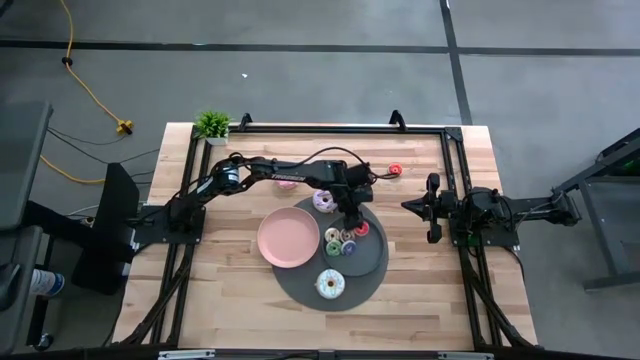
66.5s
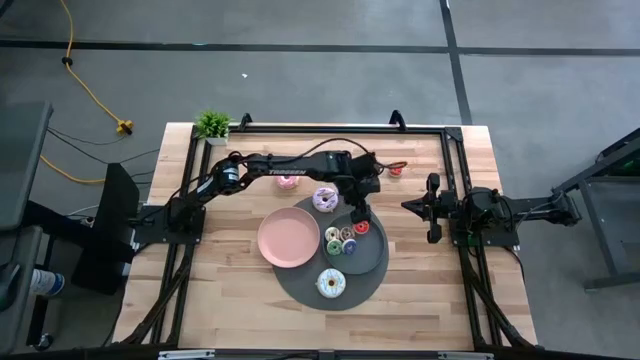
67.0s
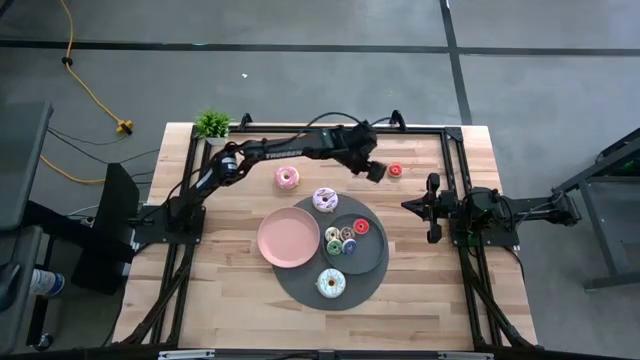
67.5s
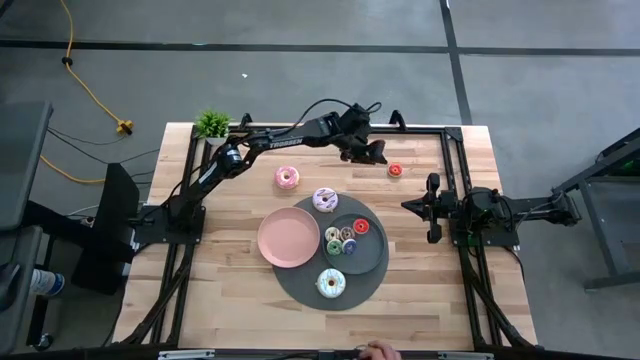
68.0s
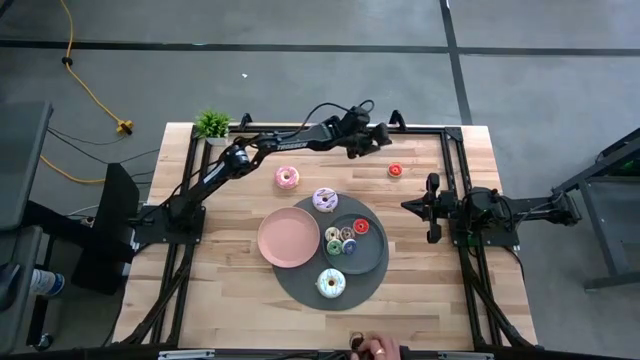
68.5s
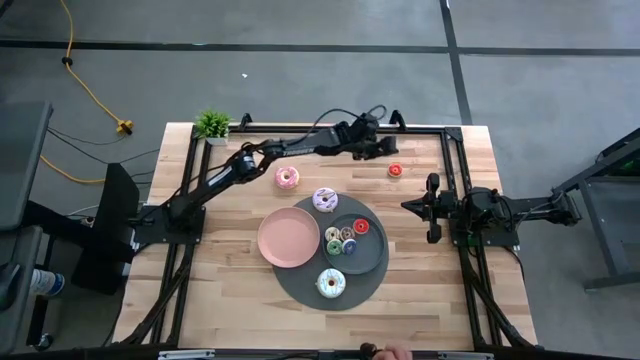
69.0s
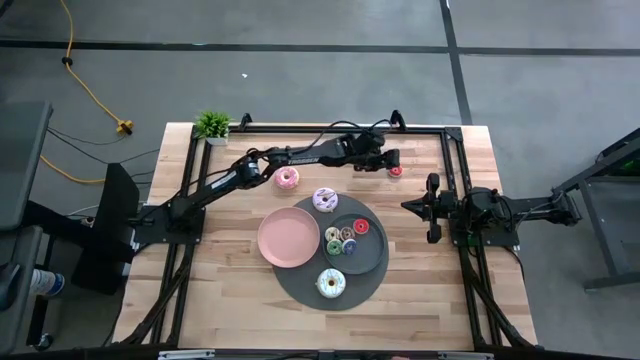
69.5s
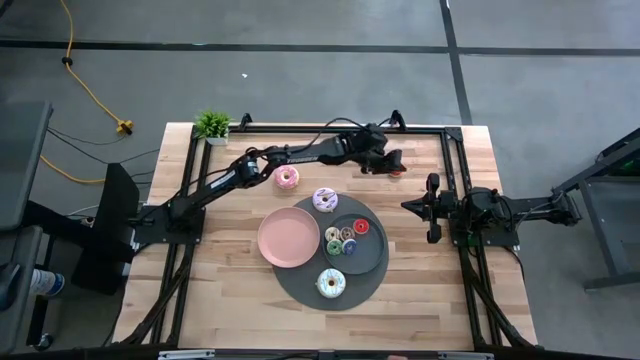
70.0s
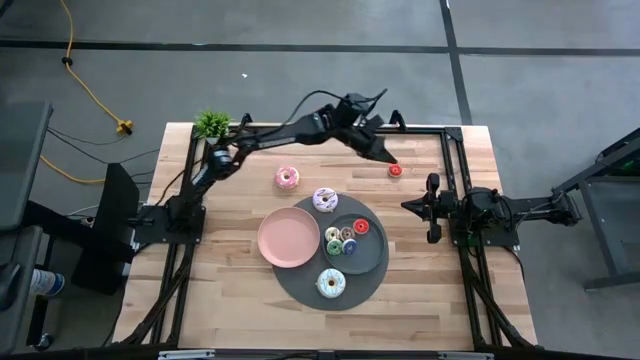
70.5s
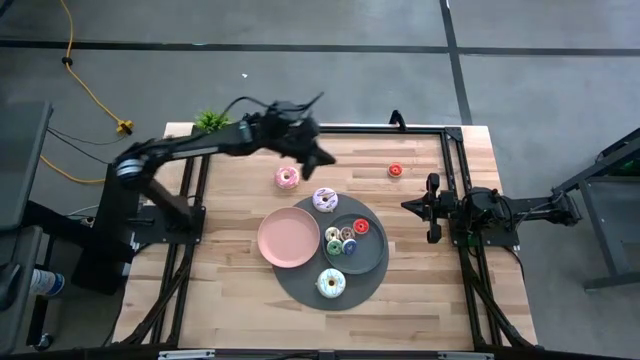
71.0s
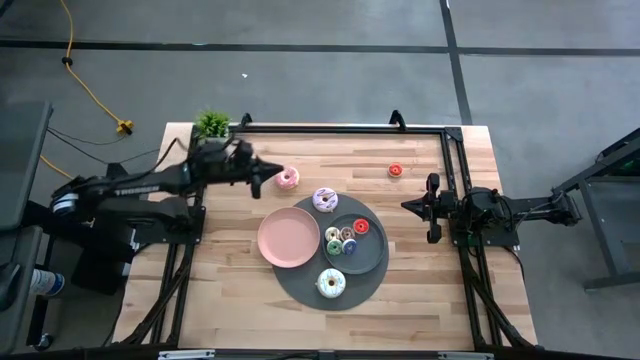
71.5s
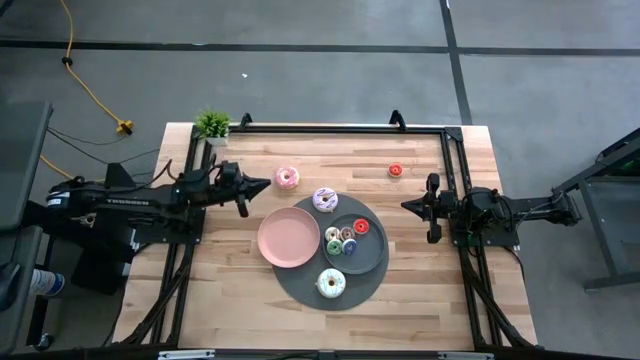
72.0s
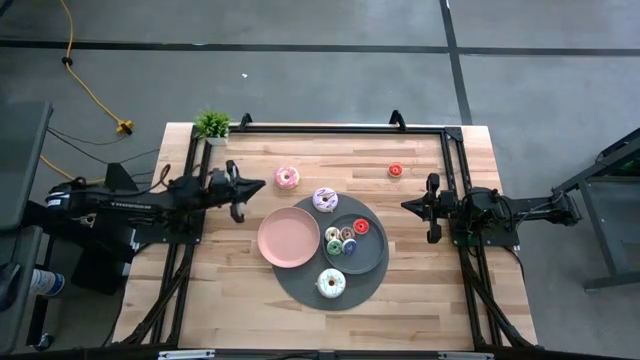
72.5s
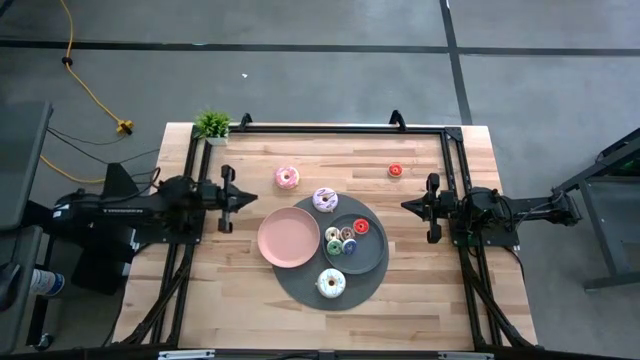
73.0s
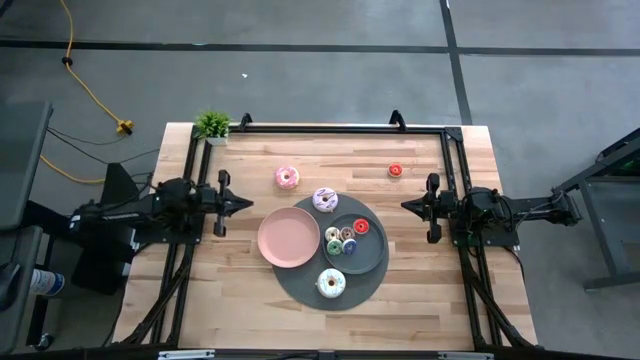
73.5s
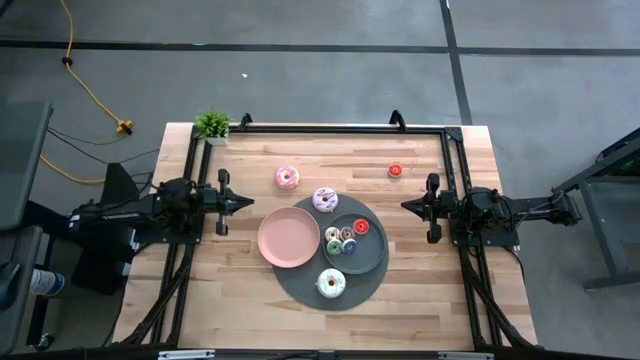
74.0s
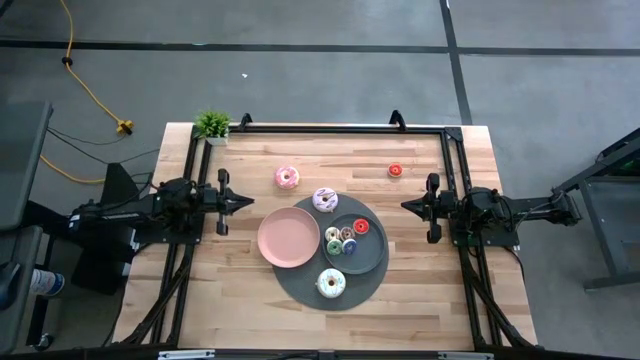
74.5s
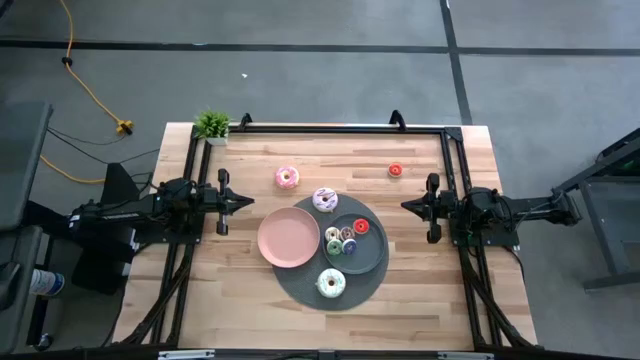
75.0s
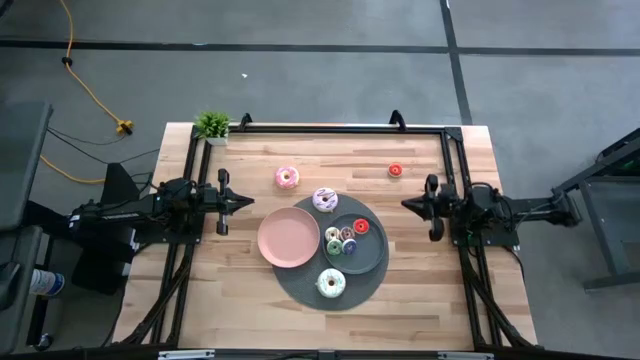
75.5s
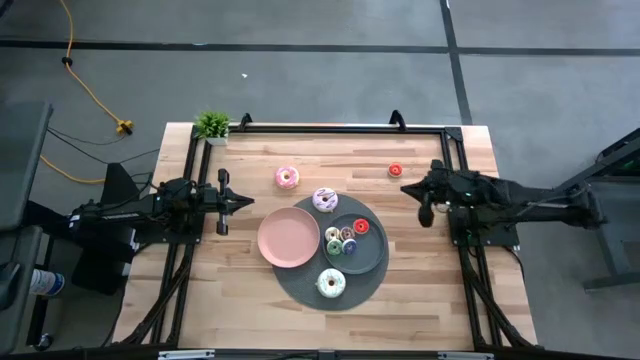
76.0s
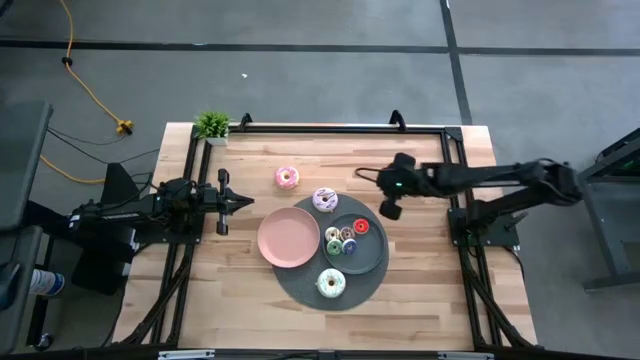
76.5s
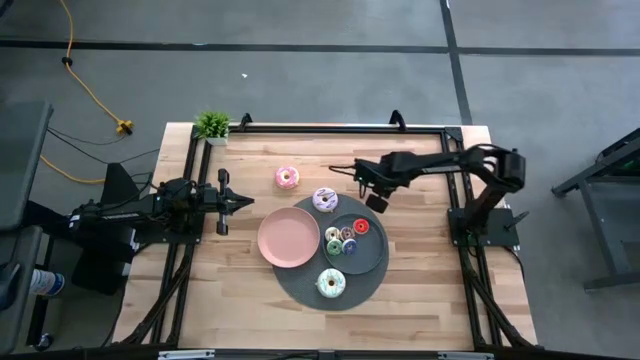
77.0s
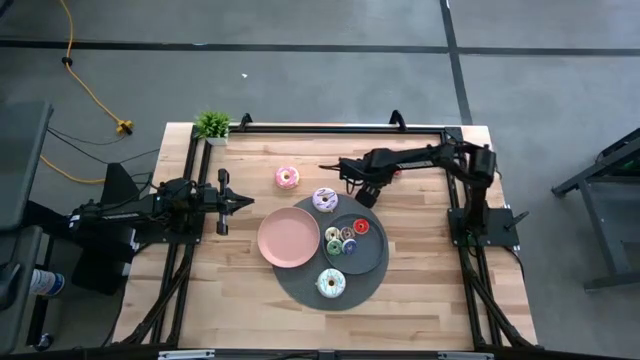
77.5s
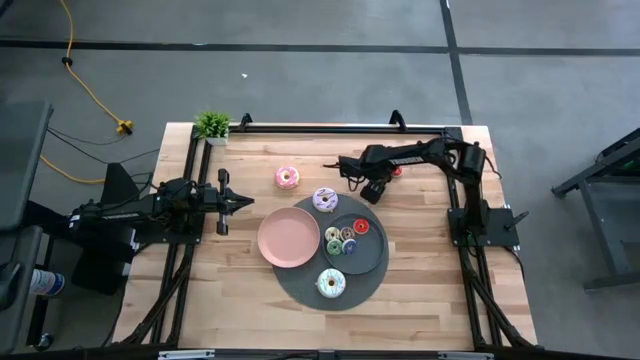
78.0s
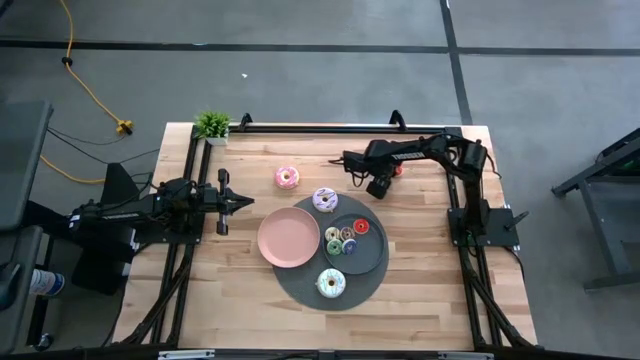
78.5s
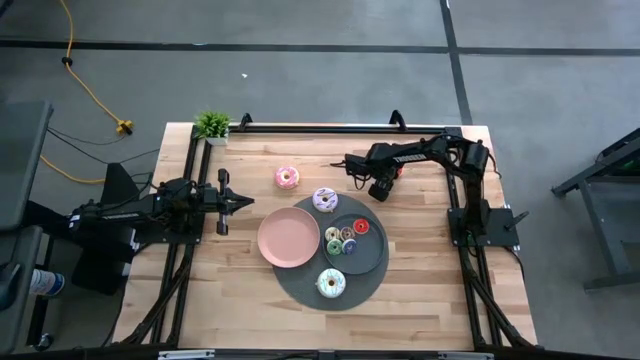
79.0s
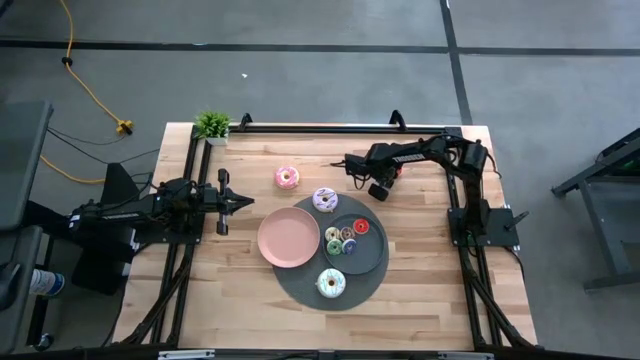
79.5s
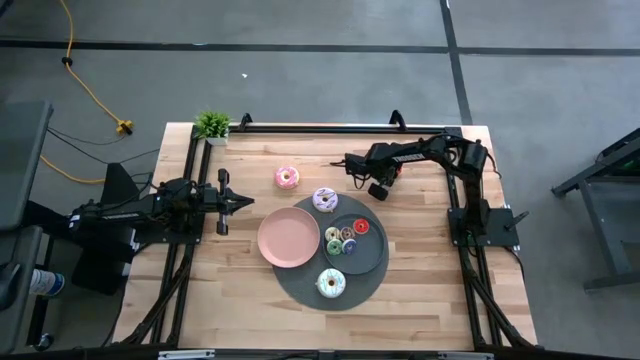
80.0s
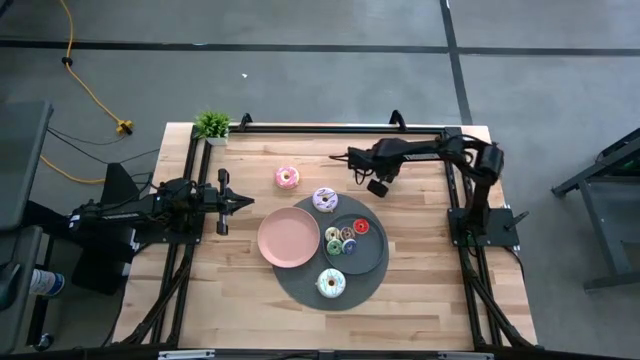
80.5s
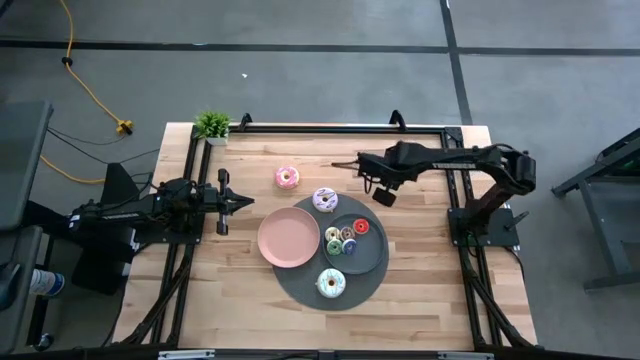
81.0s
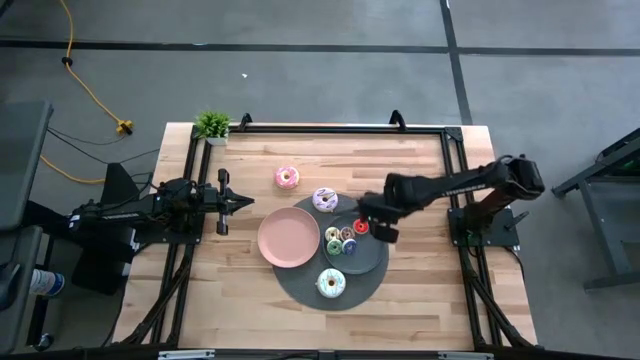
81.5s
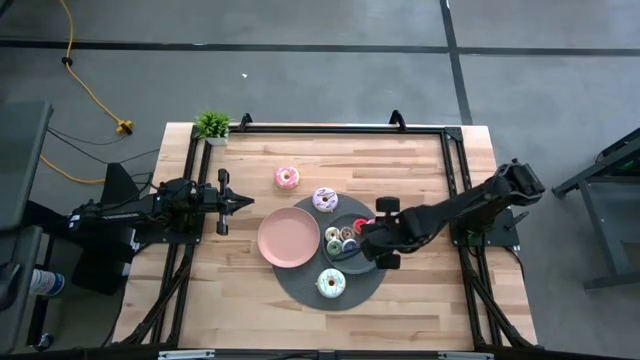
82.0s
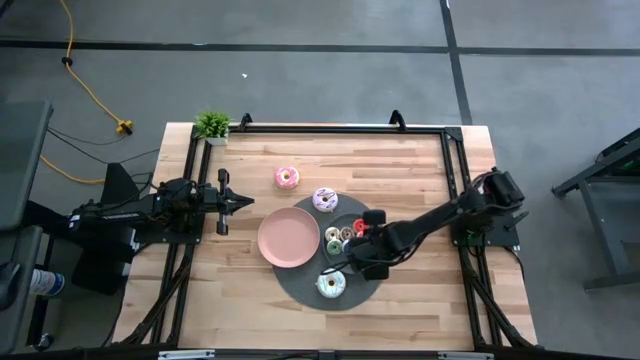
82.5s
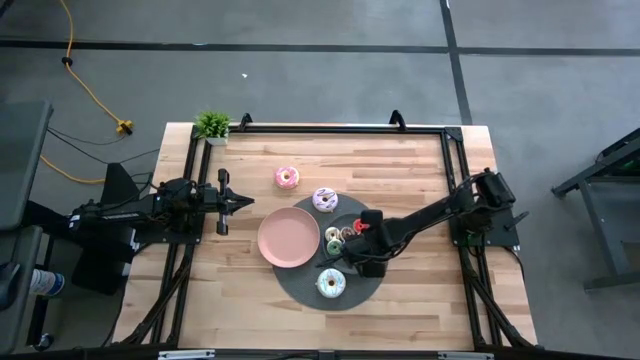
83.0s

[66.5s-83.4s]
Task: Pick & Place donuts
Put the small red donut on the black plate

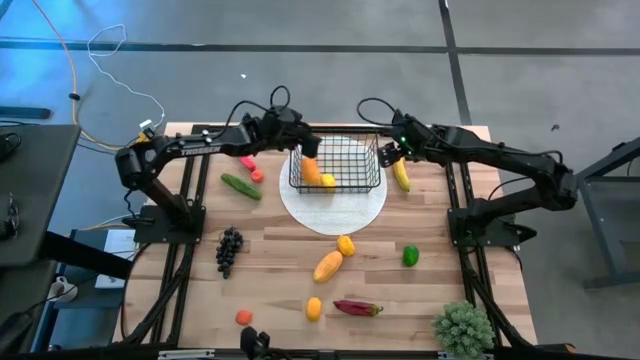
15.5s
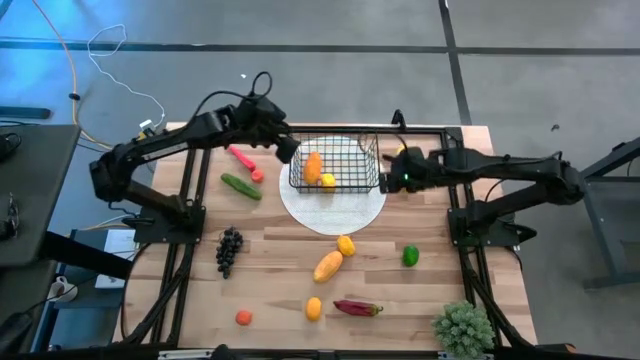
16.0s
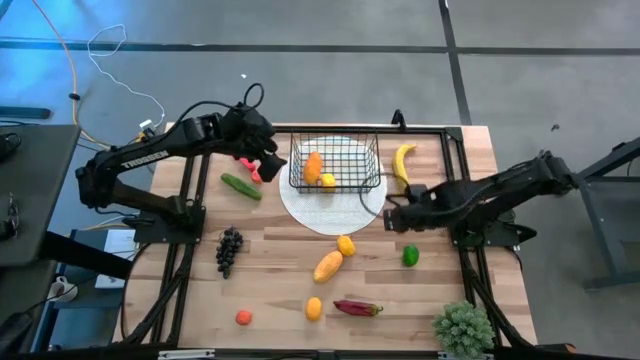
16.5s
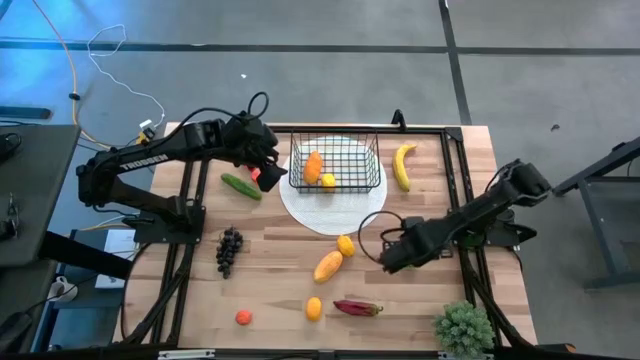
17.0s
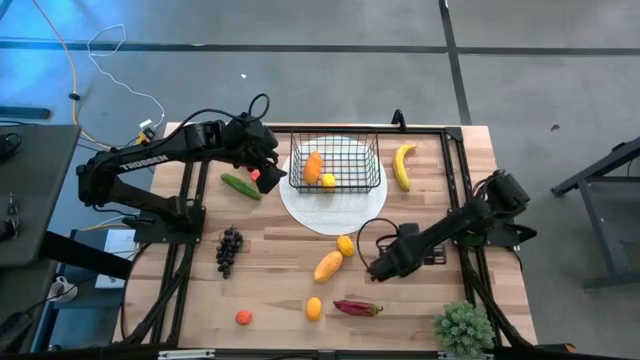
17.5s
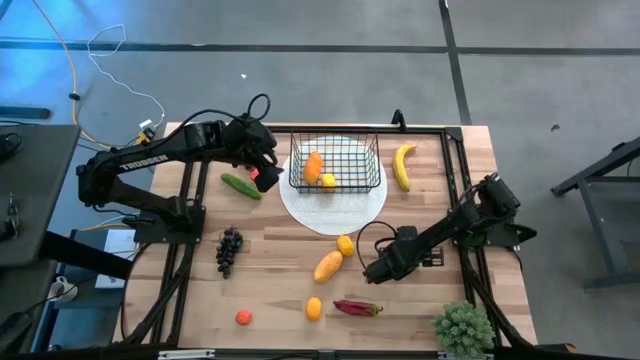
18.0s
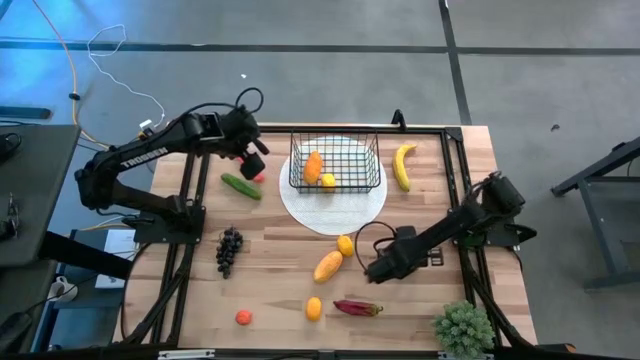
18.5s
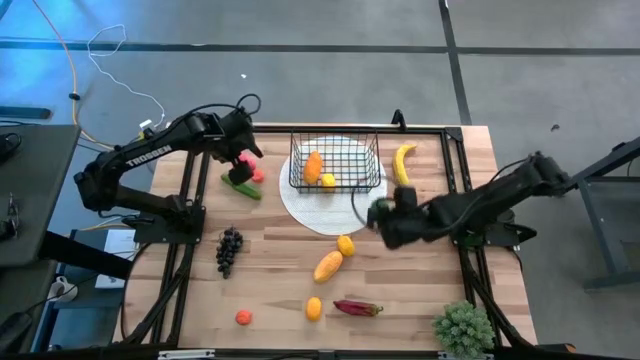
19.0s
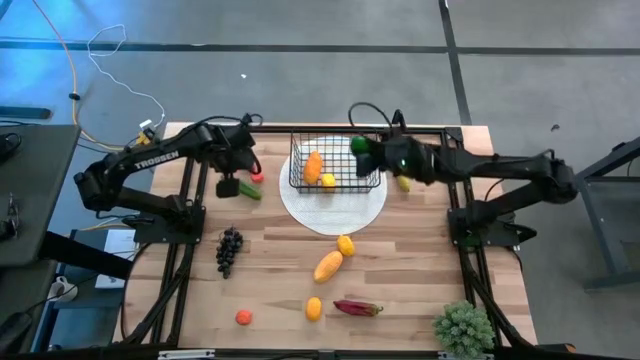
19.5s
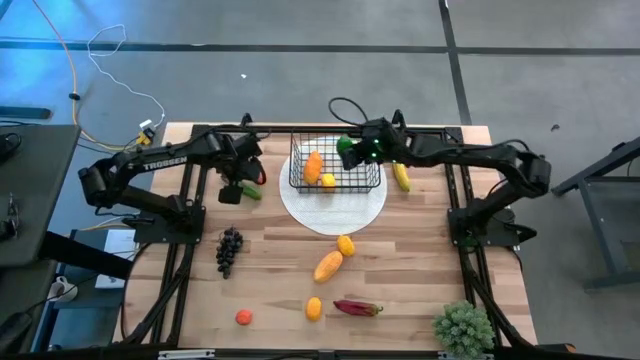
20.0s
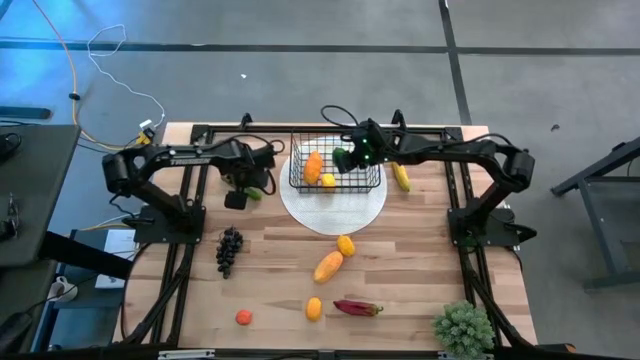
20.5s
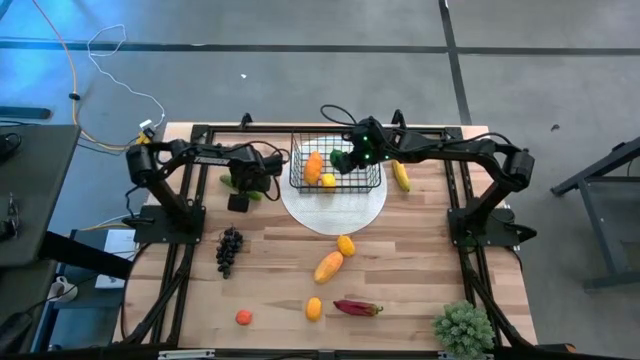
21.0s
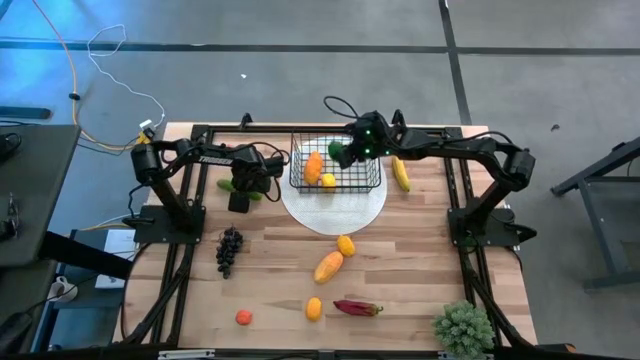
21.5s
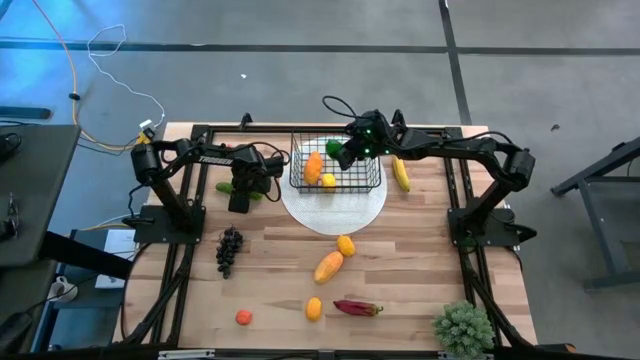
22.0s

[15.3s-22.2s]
Task: Build produce basket
Put the green lime into the black wire basket
